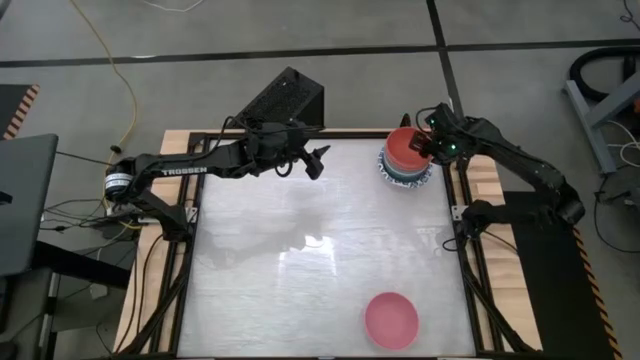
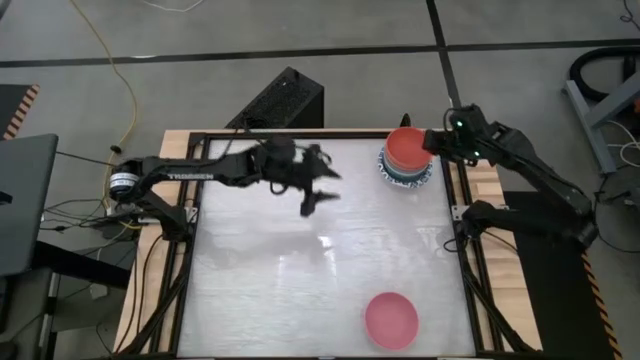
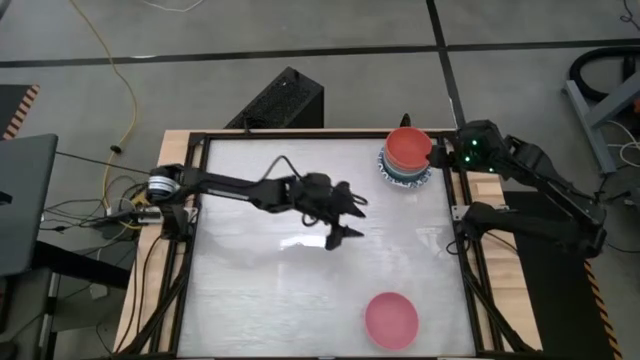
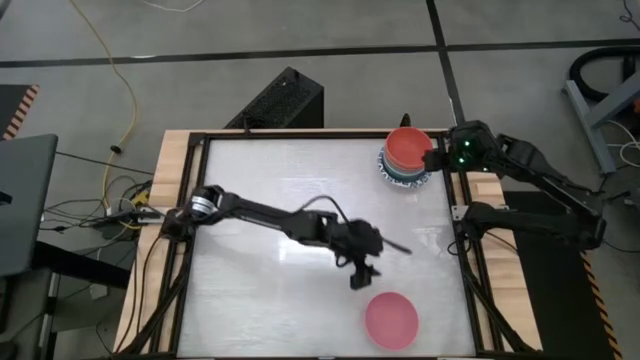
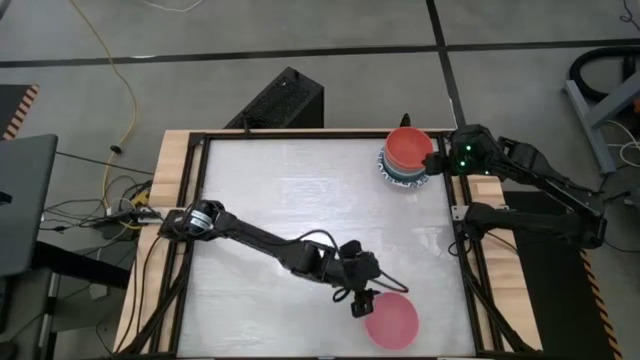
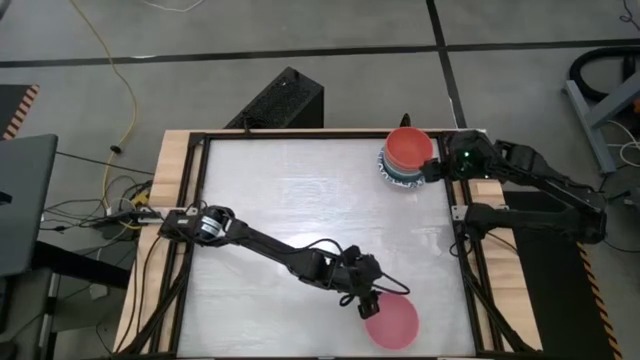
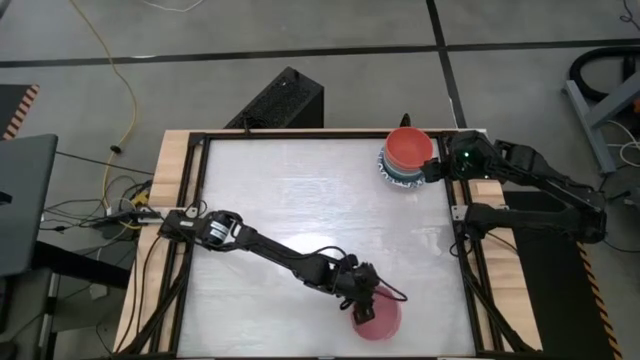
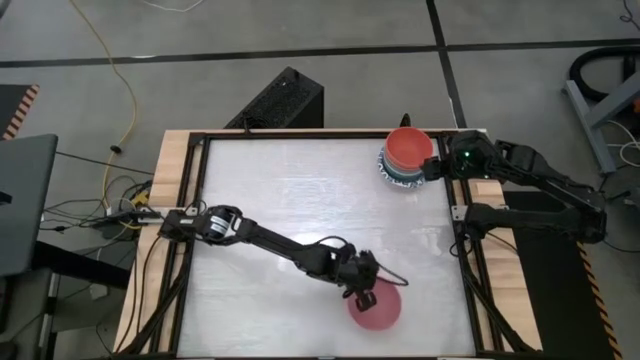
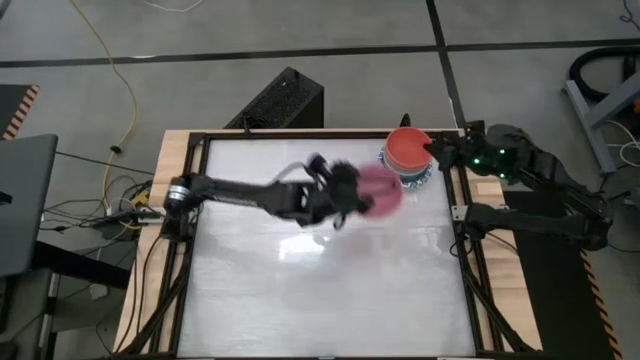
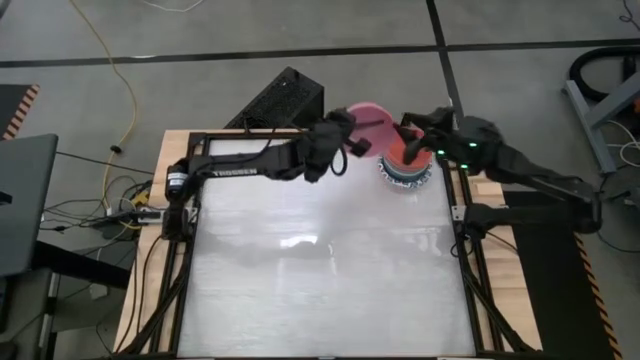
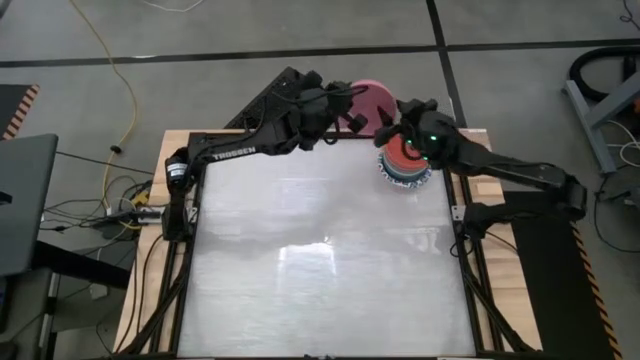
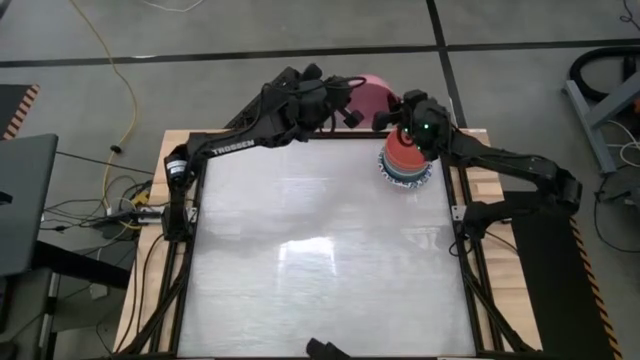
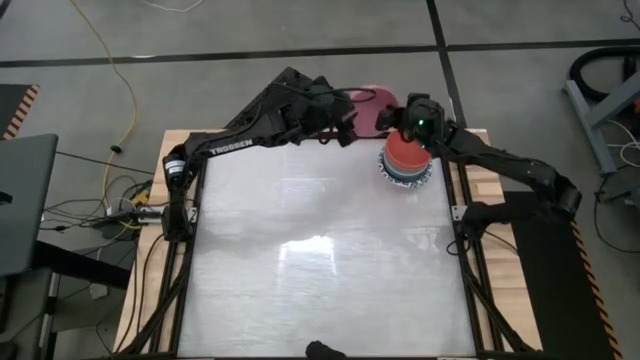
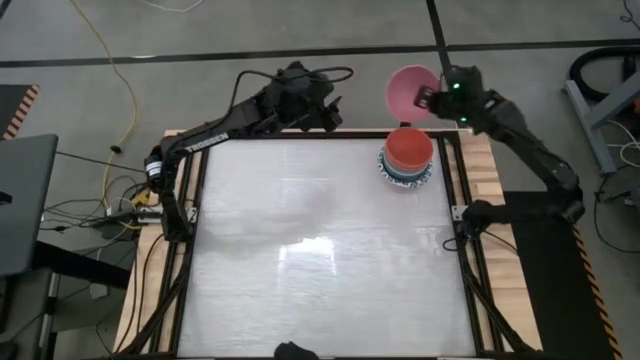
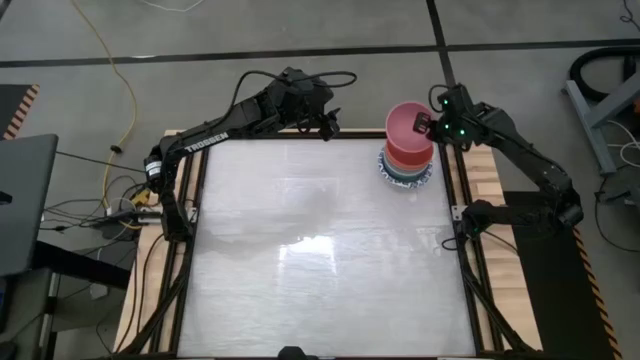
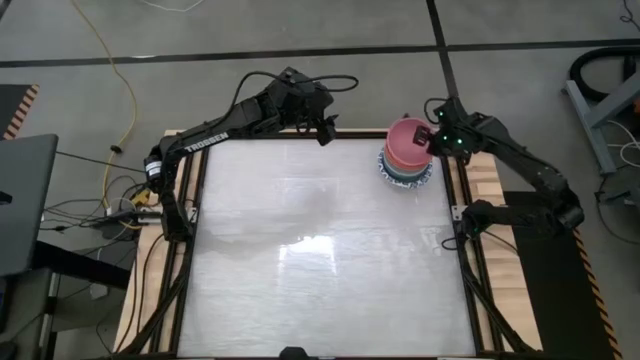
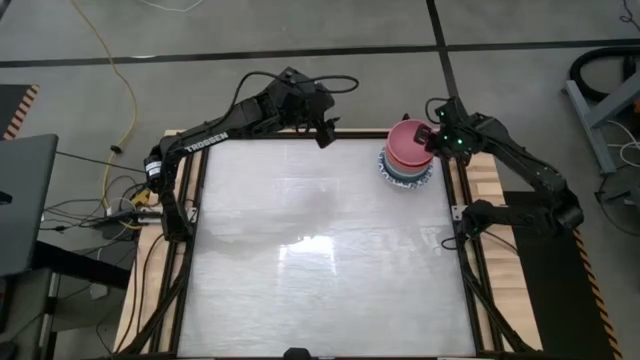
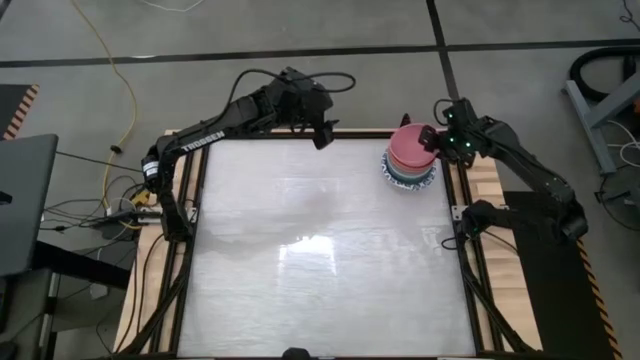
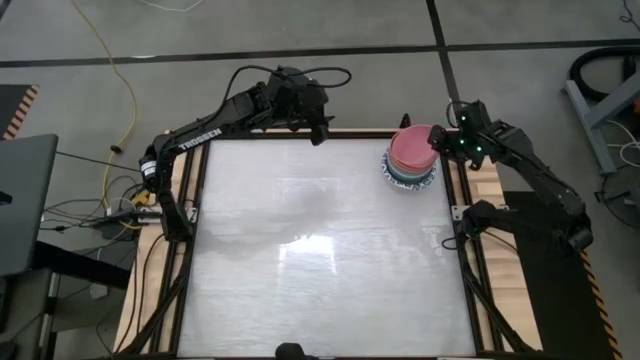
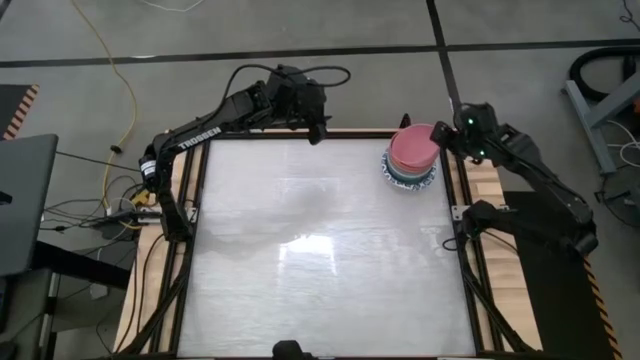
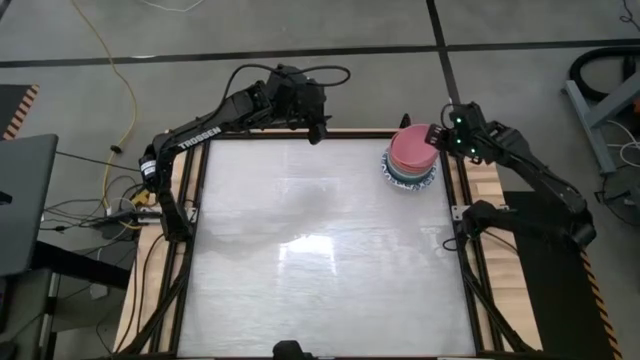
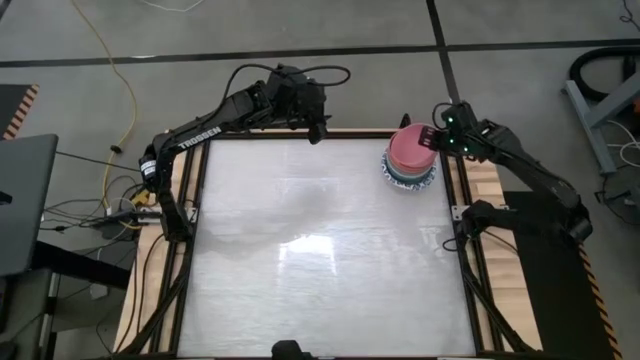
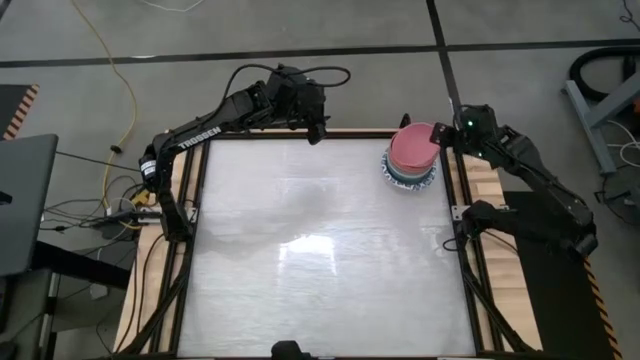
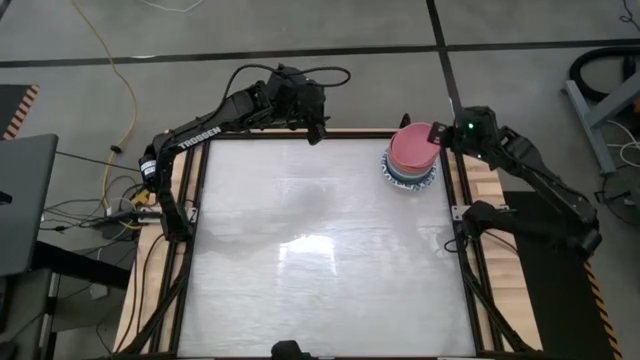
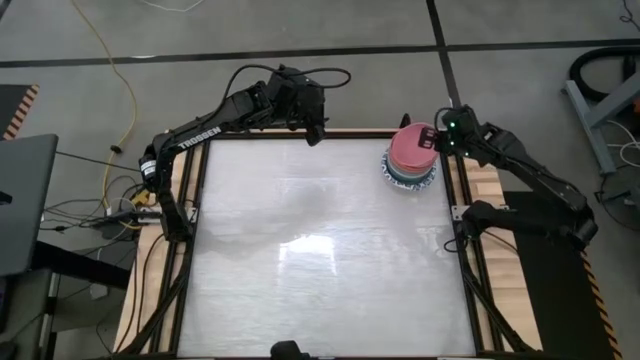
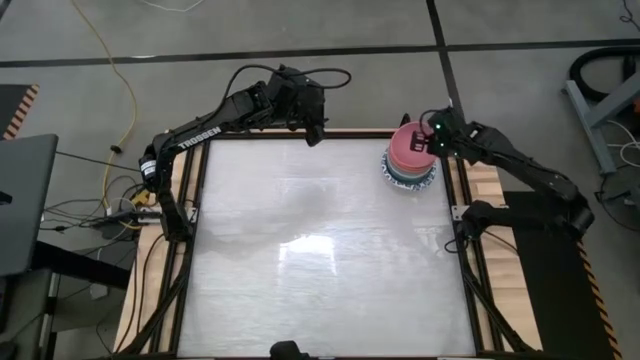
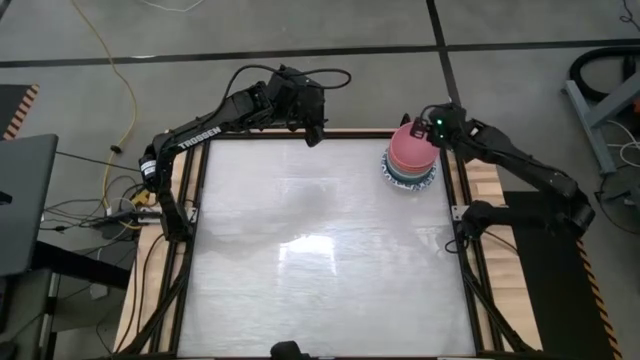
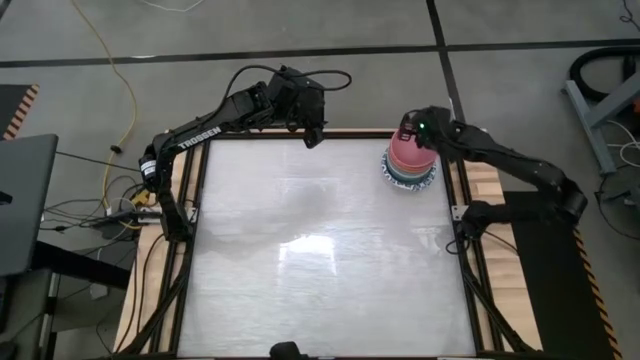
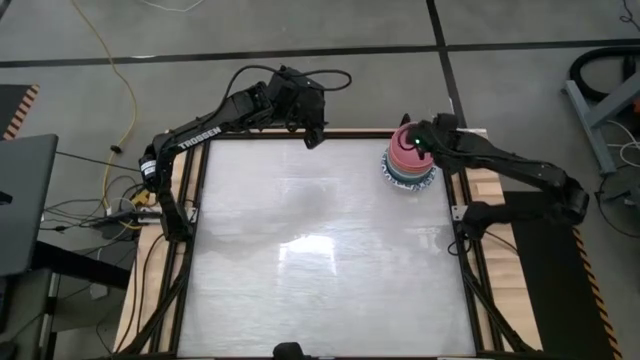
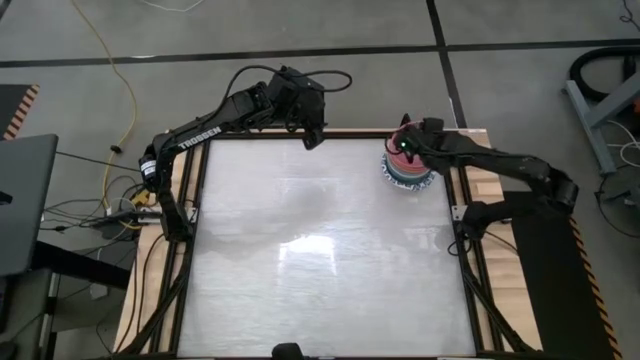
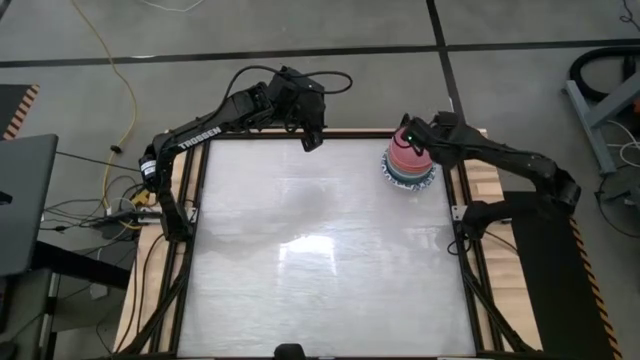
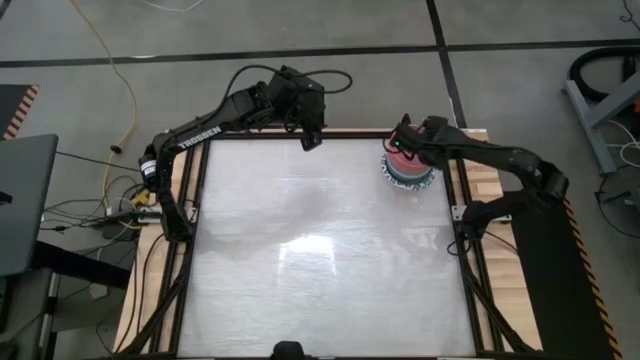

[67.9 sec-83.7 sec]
Stack the pink bowl into the orange bowl
